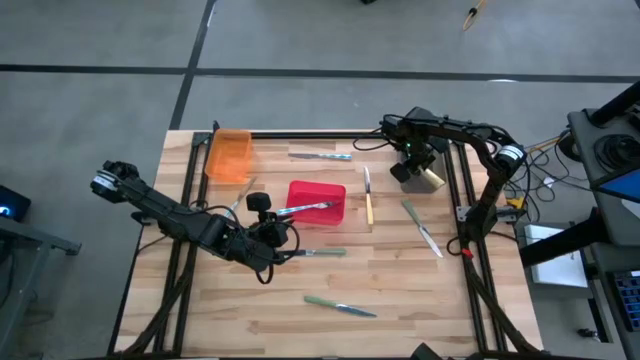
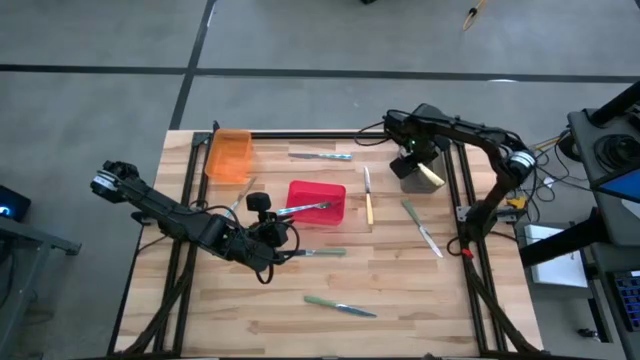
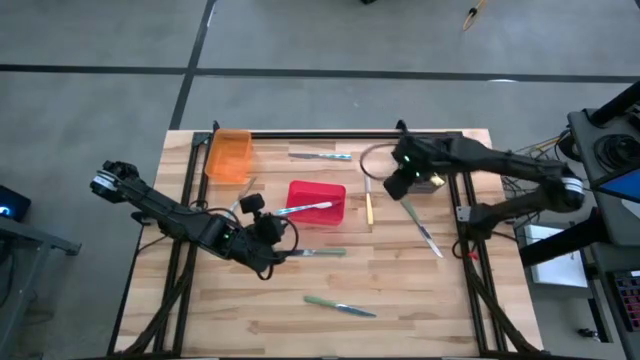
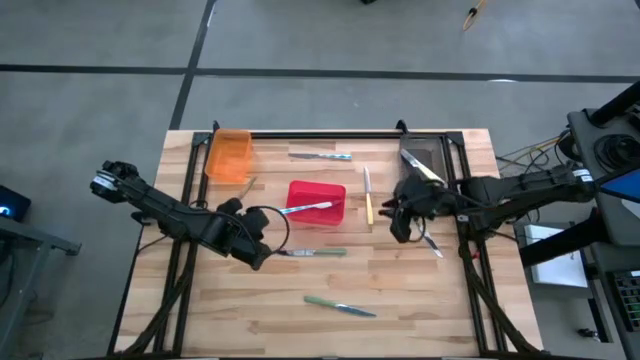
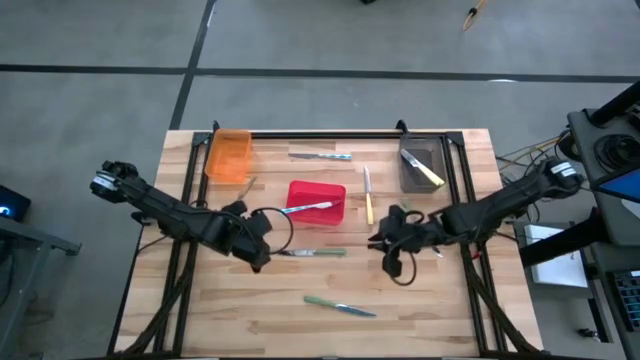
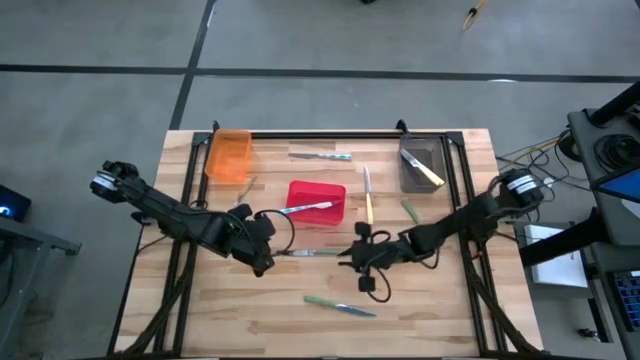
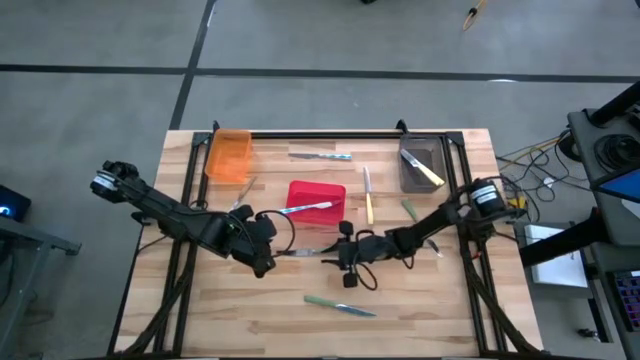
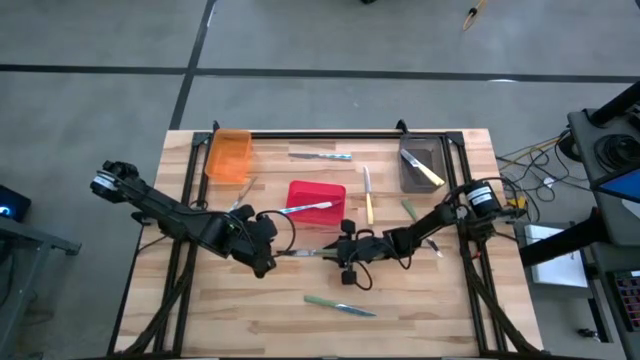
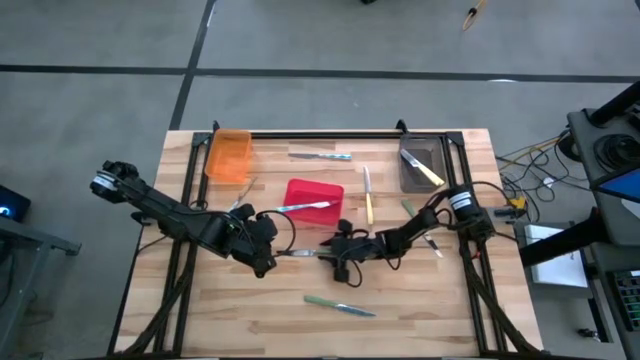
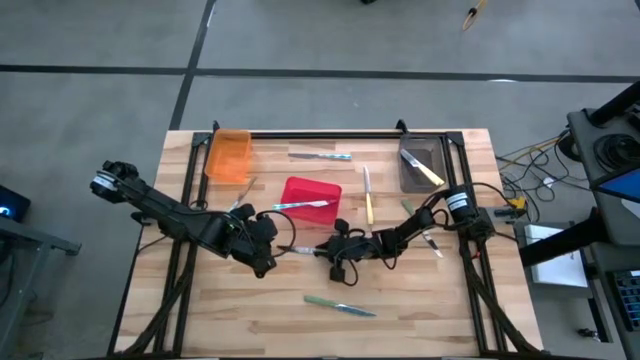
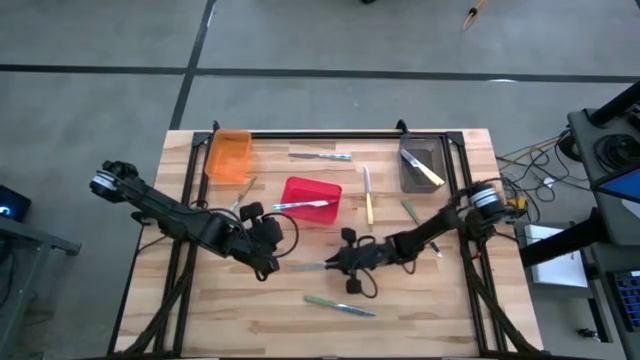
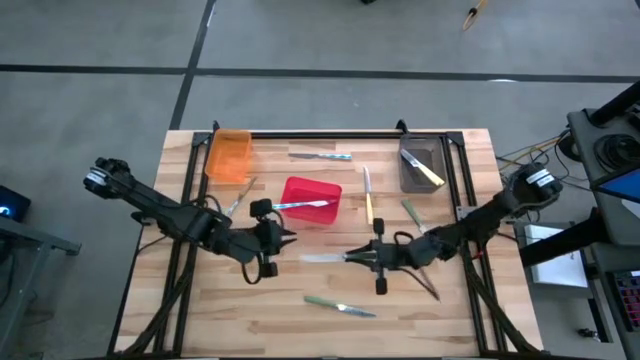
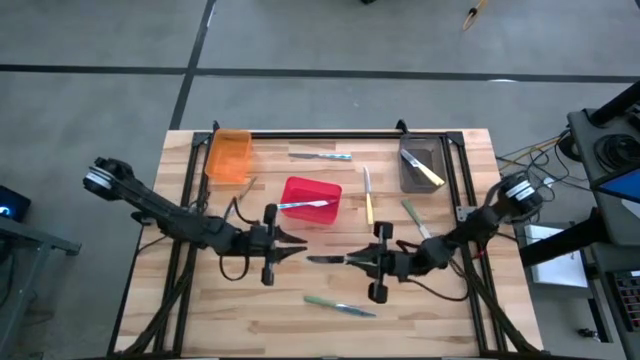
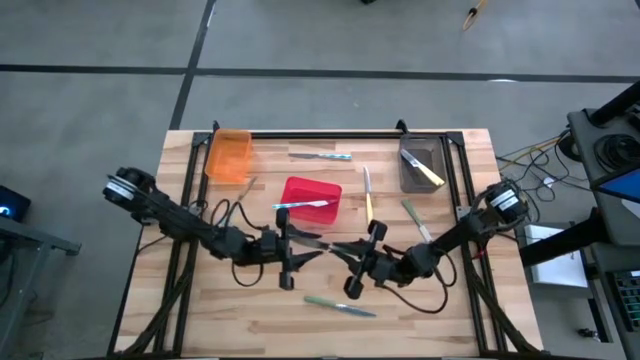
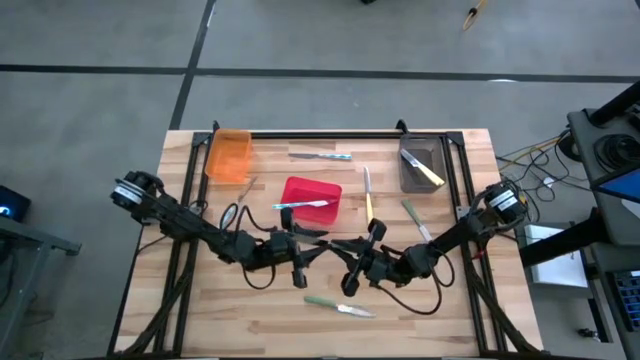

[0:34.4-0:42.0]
Task: Sort silverware by color (type)
Put the middle green table knife into the orange bin

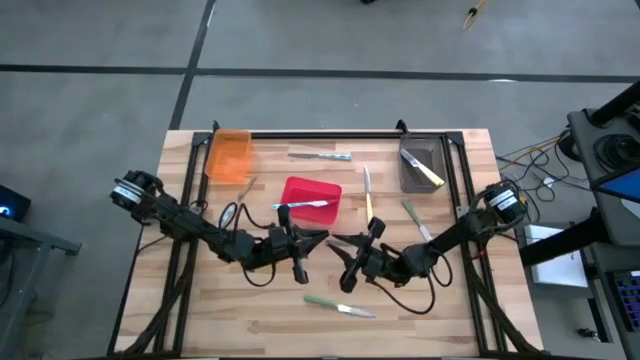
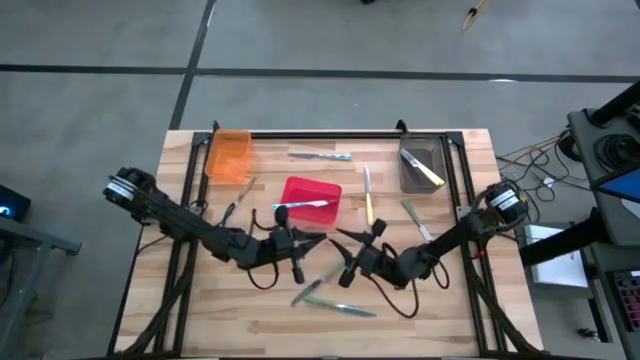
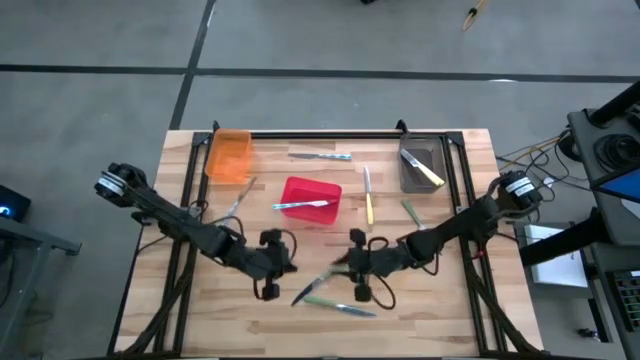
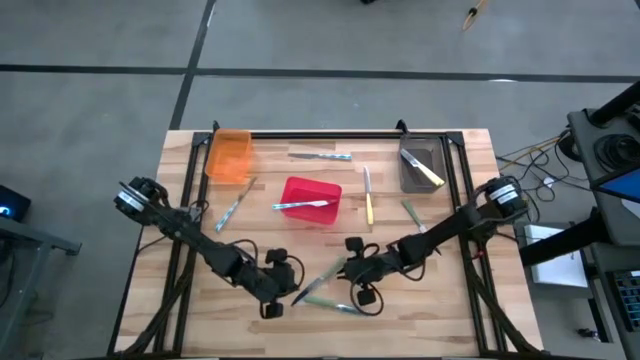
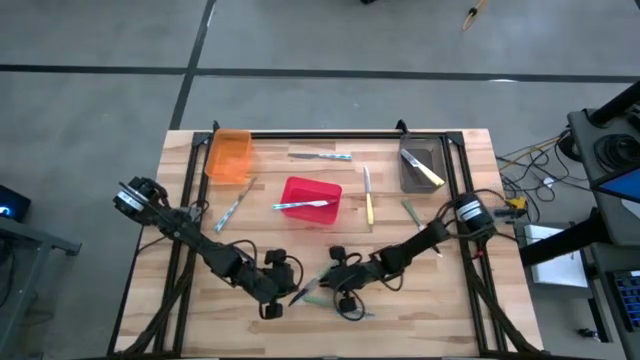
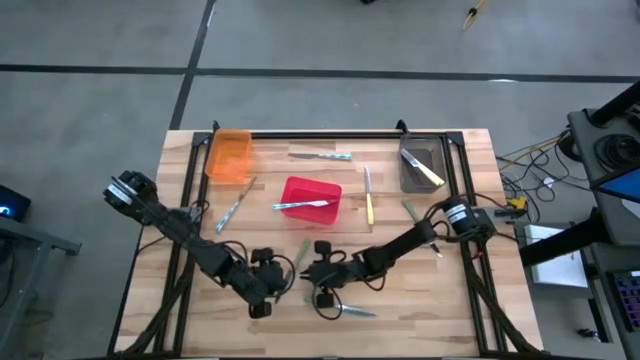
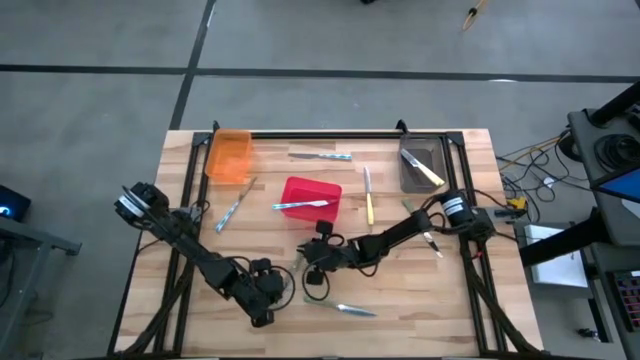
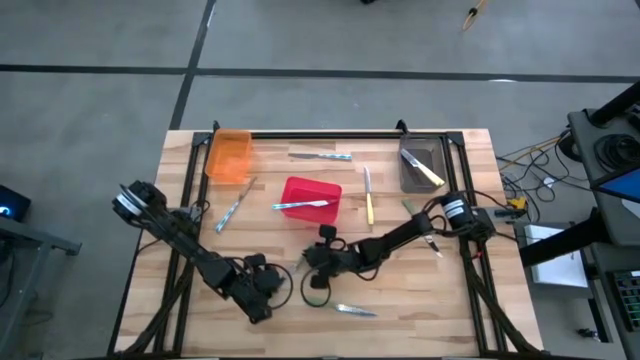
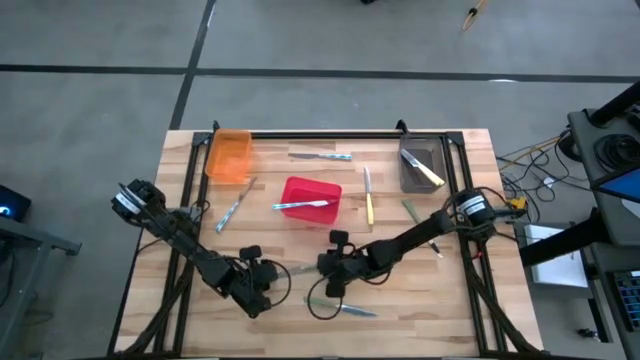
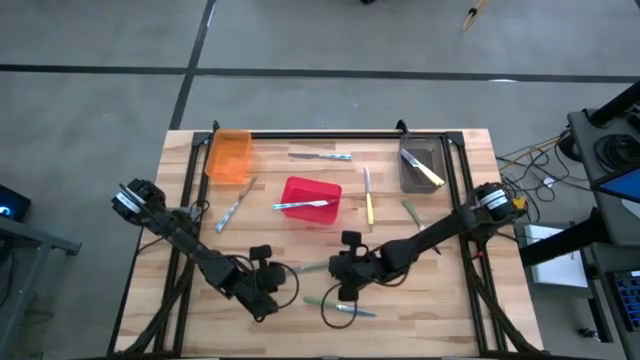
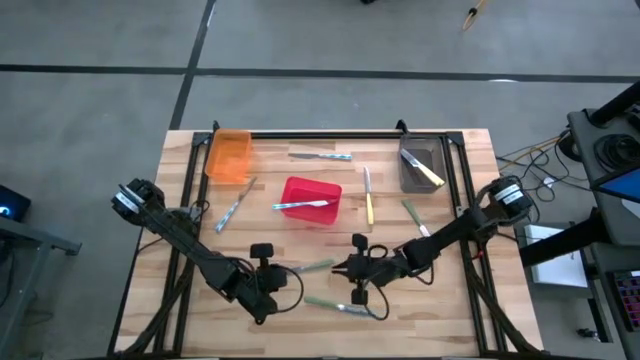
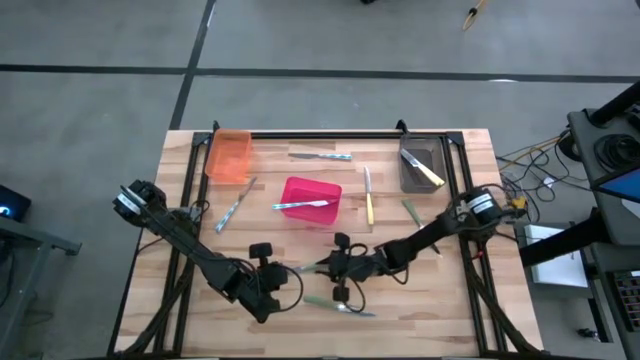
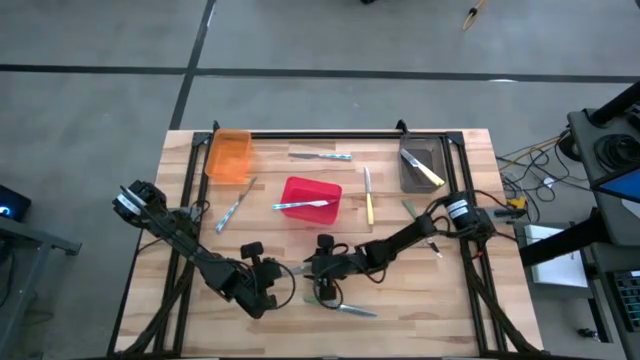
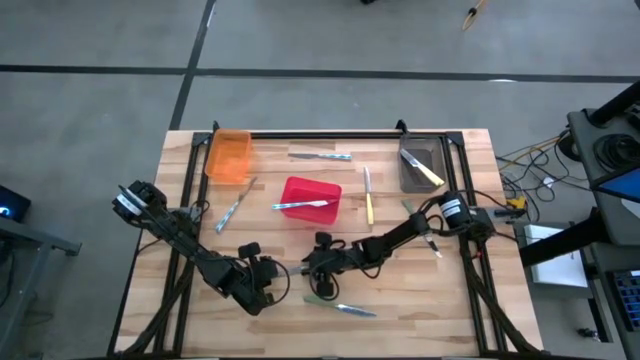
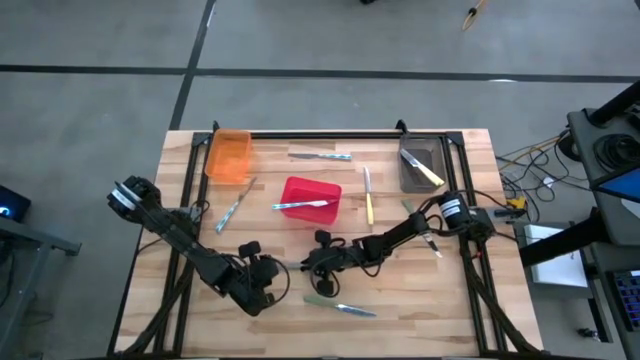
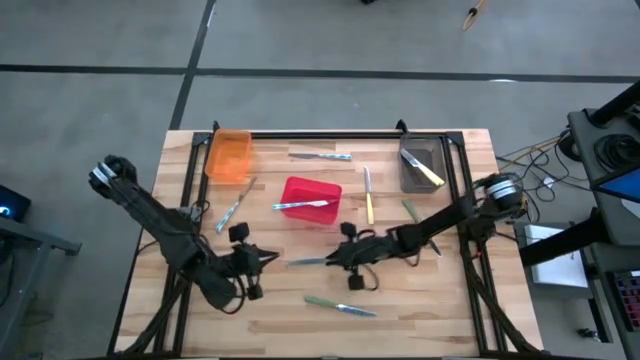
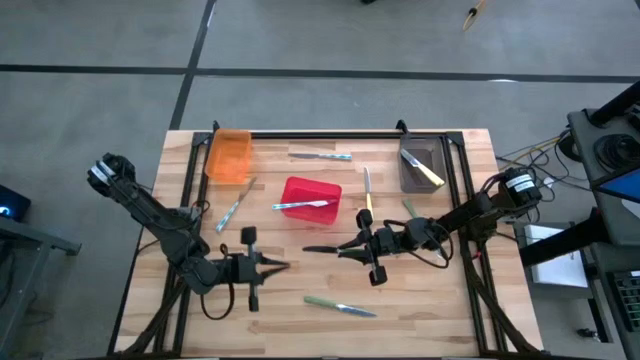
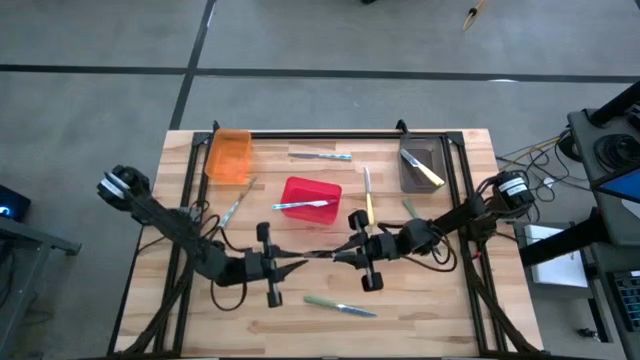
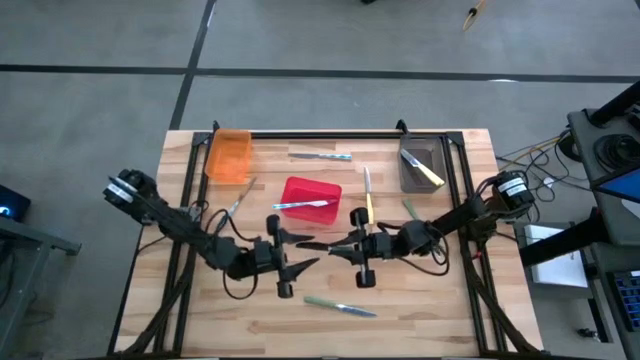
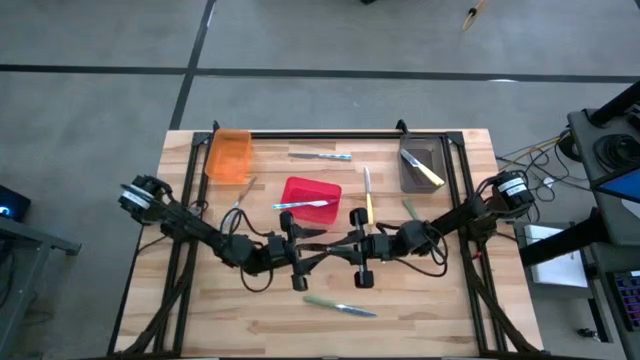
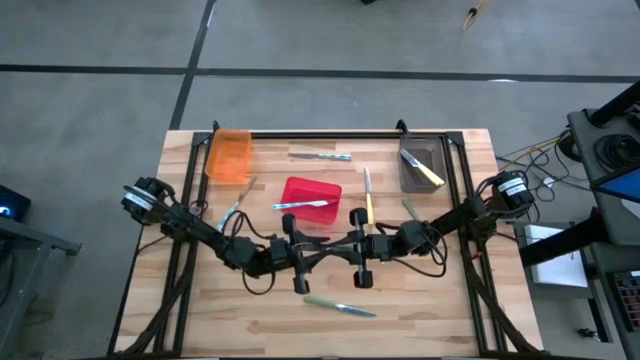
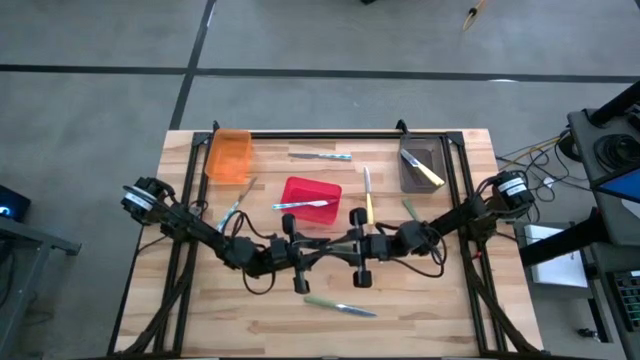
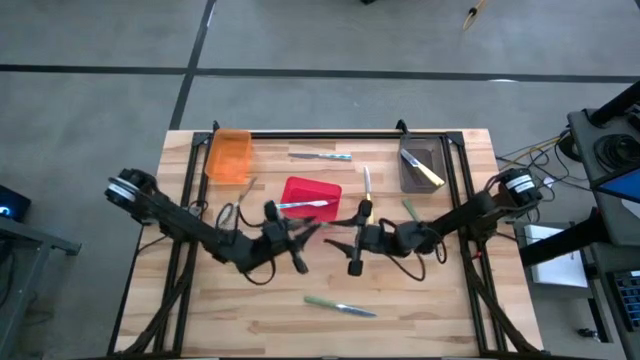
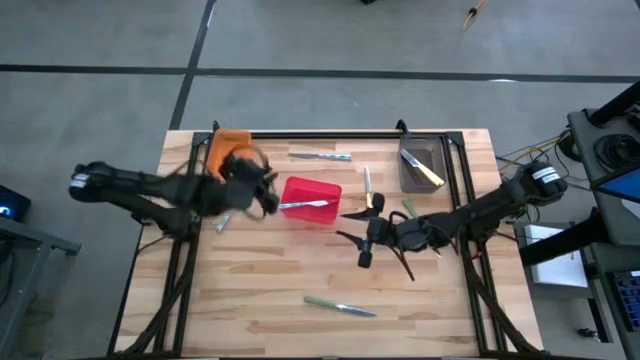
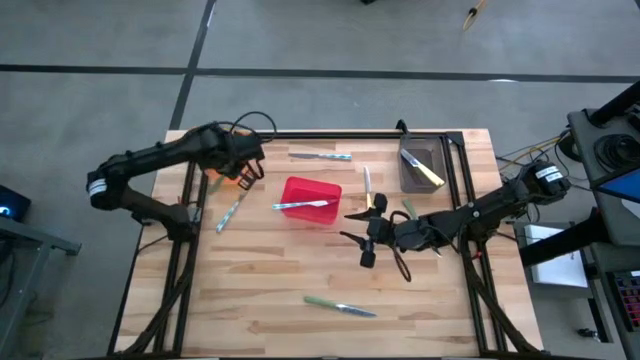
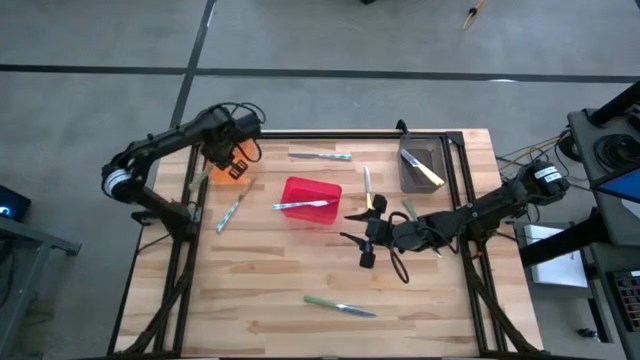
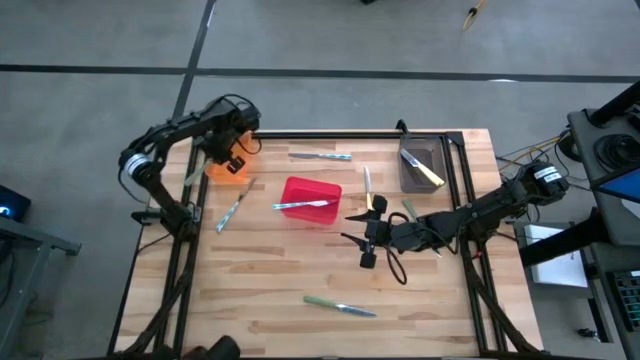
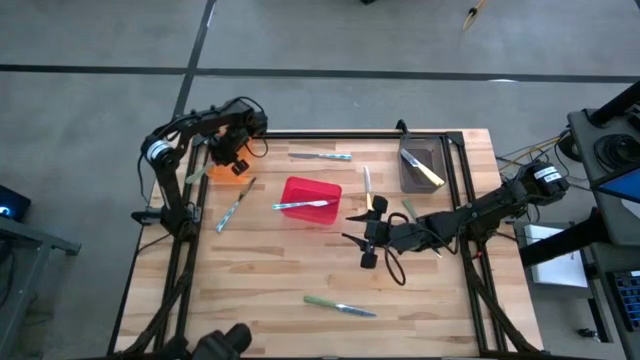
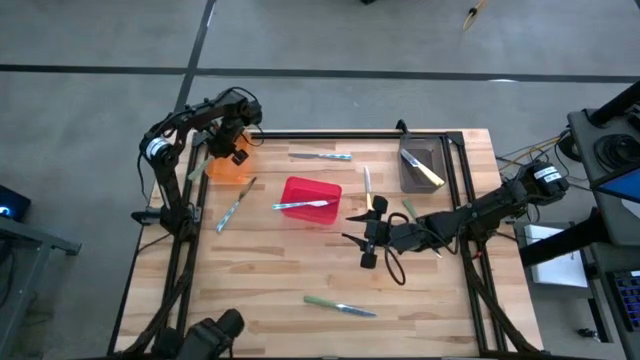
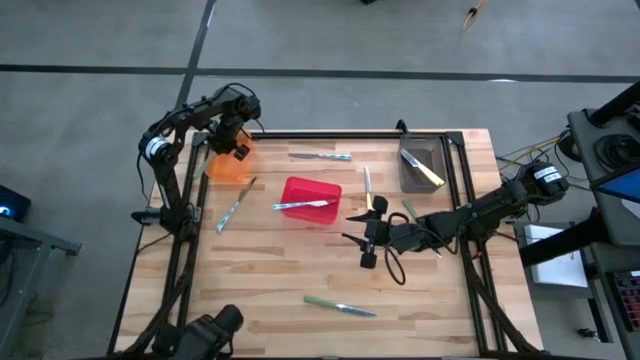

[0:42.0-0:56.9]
Put the middle green table knife into the orange bin
